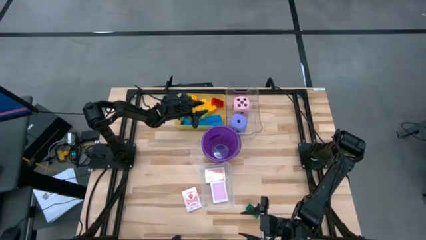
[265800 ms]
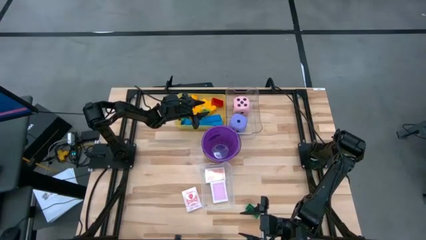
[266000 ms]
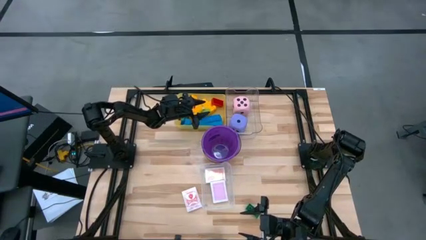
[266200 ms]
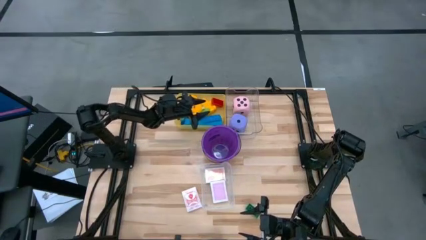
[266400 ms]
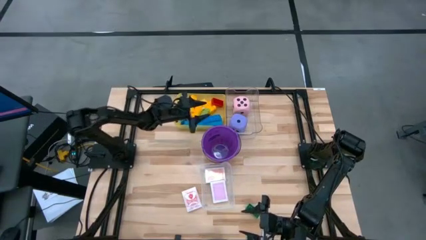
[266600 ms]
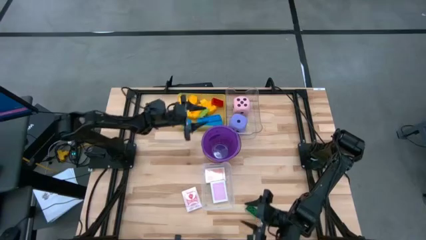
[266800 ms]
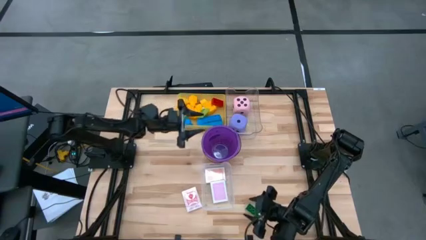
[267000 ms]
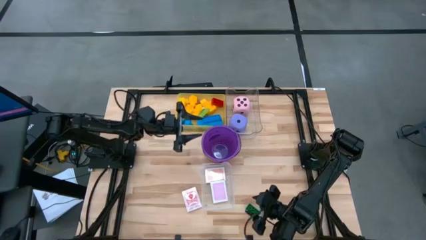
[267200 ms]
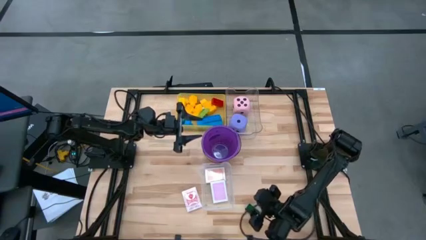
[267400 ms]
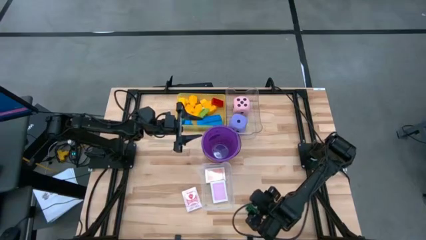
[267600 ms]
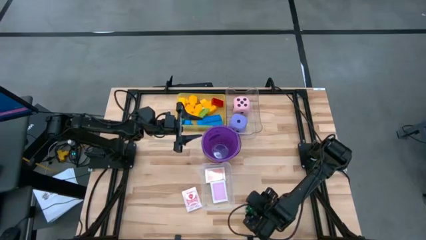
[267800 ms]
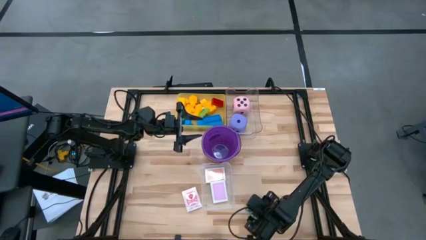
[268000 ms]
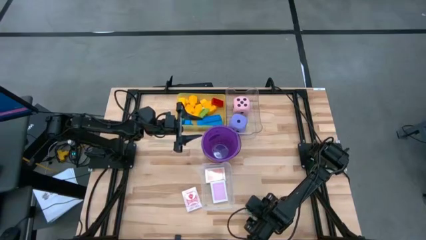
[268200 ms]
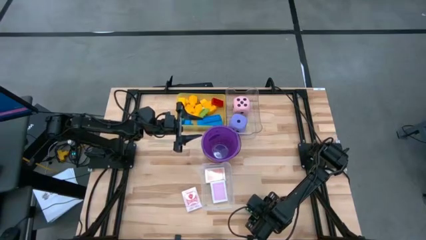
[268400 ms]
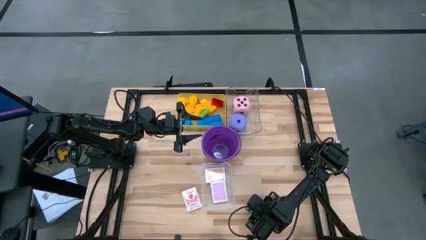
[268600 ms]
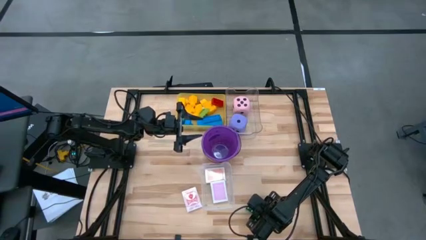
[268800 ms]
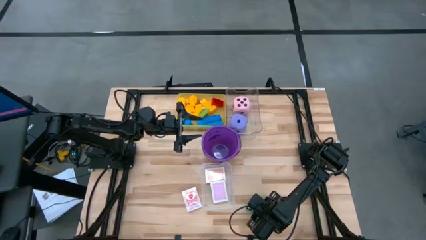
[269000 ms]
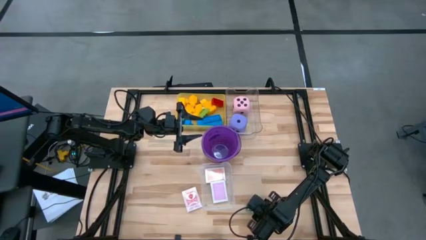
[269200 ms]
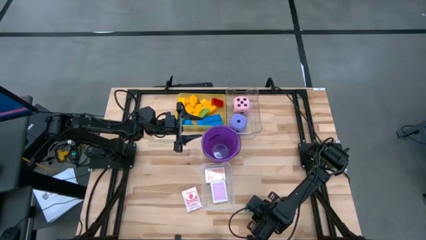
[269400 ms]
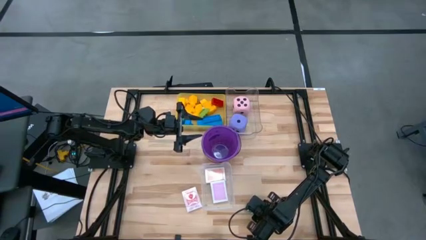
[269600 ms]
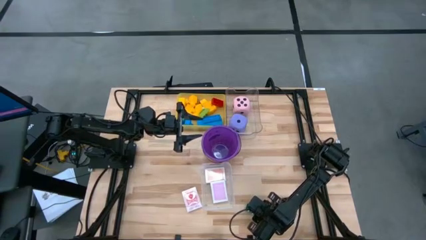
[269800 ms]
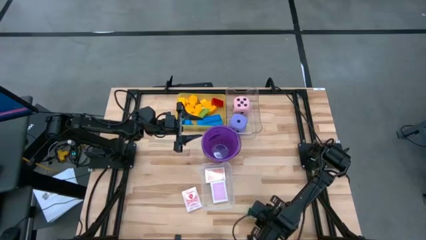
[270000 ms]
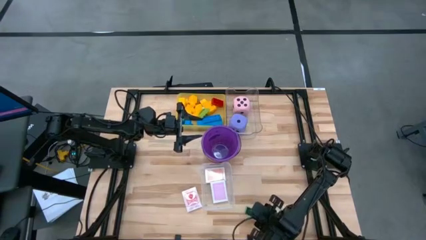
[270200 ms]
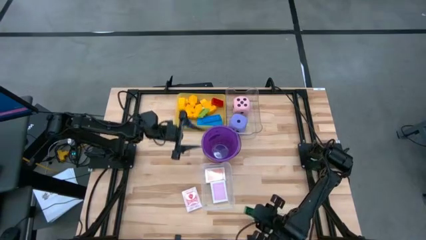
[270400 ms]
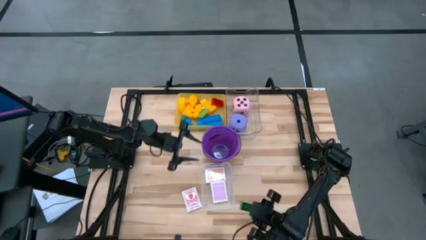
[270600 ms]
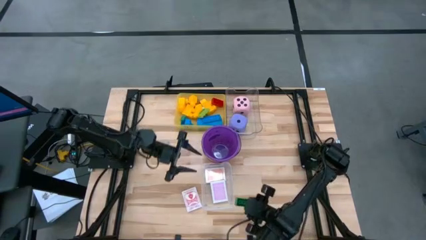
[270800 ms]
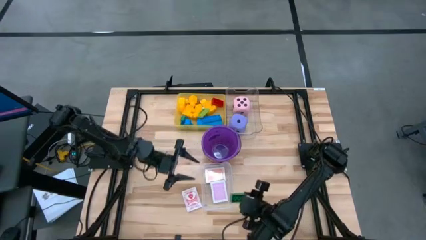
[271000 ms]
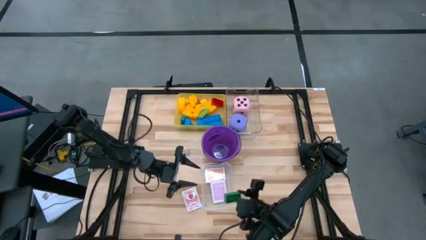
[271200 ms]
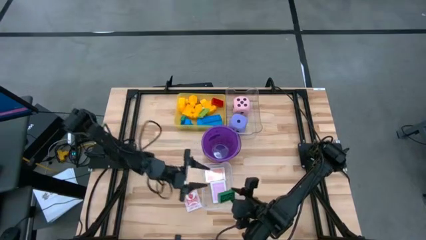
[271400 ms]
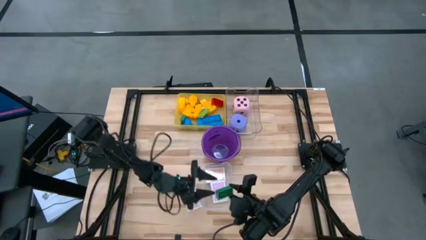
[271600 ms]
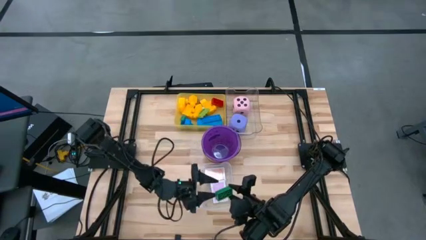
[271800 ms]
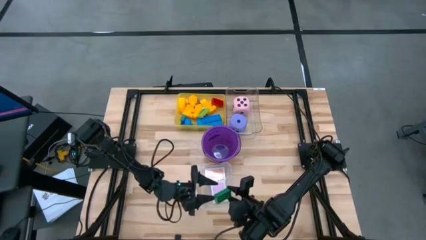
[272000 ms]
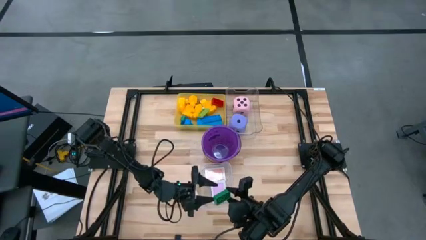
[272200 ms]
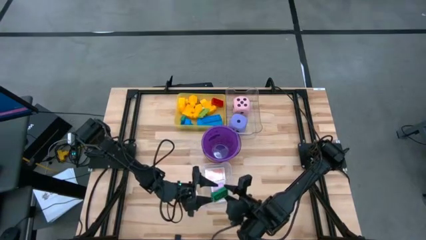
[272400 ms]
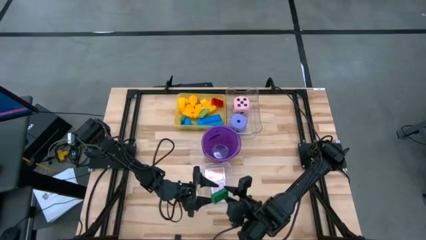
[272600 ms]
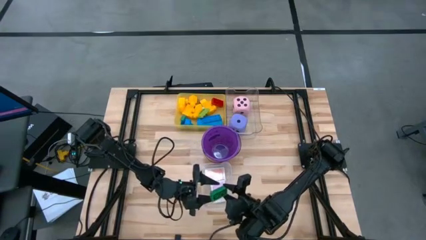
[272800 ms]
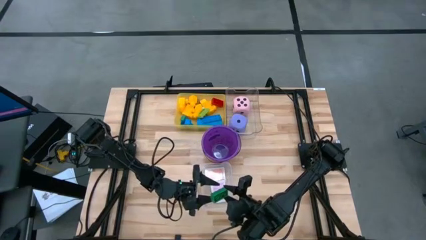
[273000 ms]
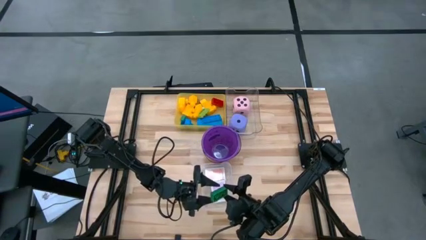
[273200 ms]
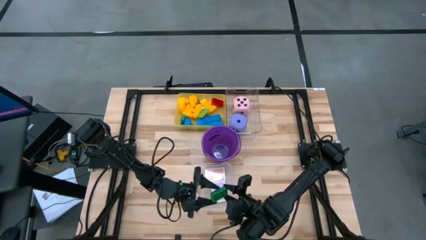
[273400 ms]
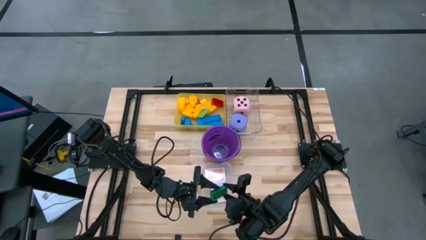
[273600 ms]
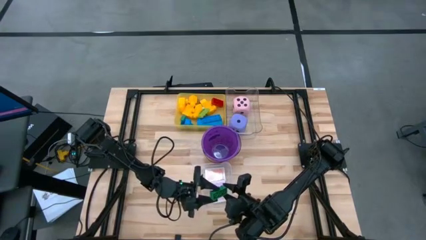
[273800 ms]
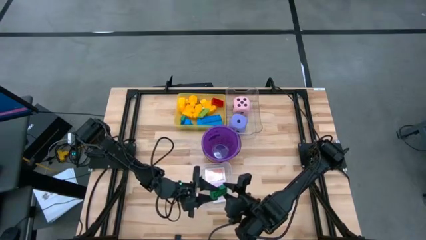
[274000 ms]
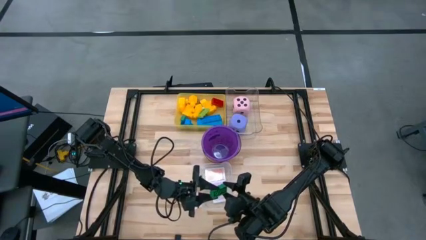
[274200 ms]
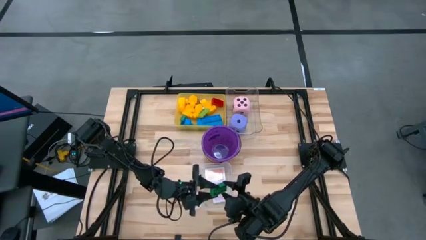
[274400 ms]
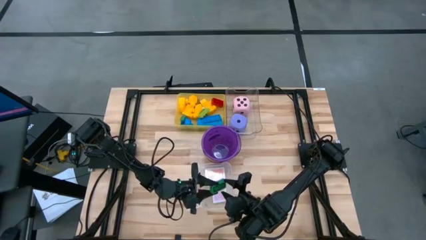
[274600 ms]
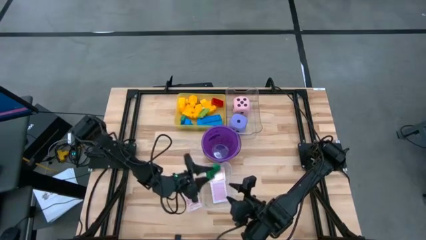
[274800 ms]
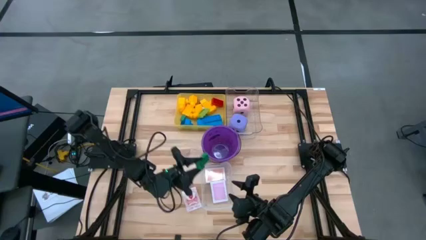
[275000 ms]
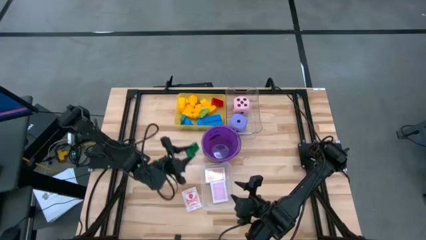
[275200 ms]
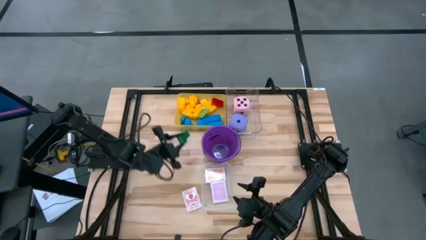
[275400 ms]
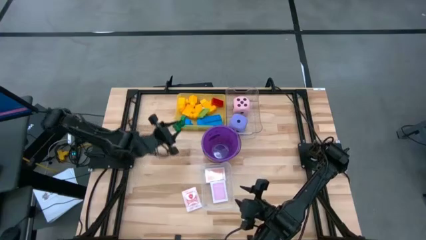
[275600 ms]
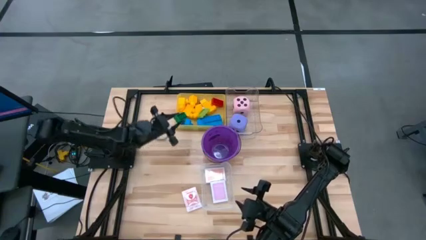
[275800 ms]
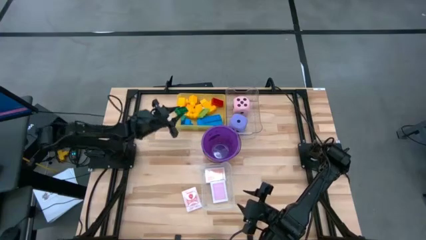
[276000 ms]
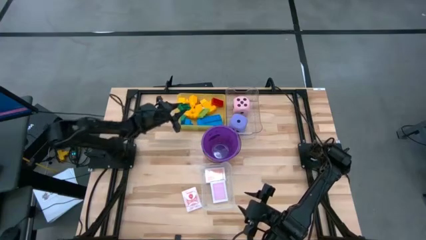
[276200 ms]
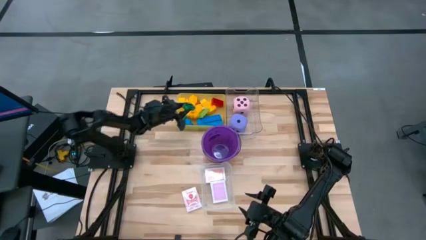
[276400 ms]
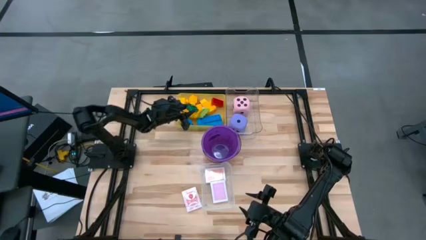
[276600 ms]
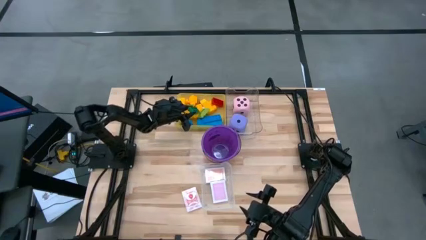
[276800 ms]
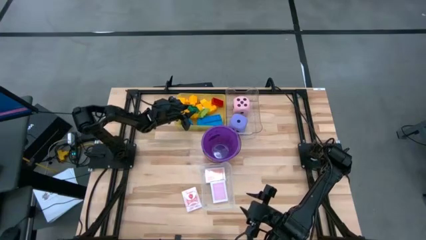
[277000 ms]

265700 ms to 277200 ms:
Task: Pick & Place Toys
Put the green game piece into the yellow bin

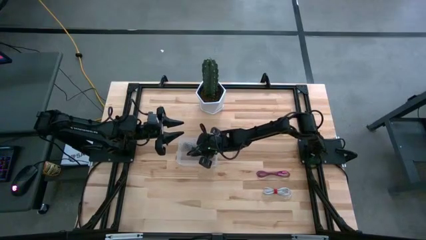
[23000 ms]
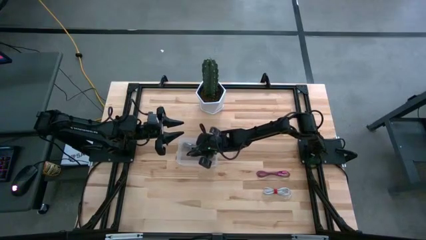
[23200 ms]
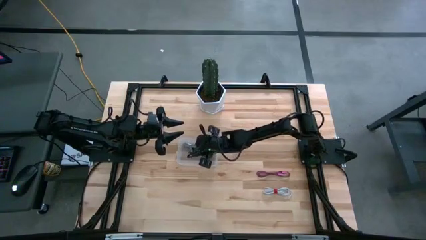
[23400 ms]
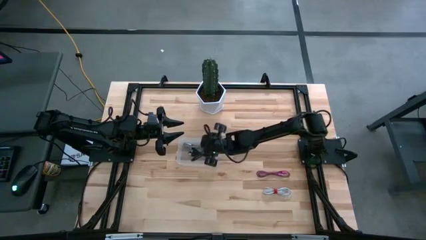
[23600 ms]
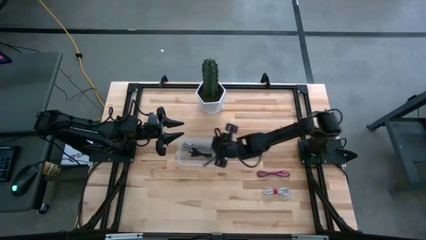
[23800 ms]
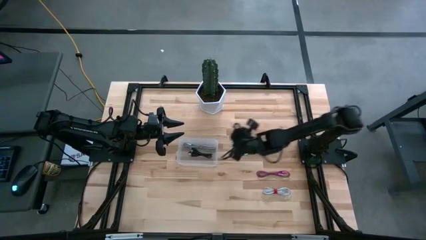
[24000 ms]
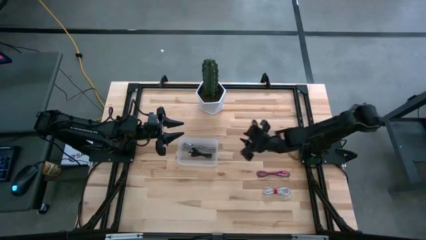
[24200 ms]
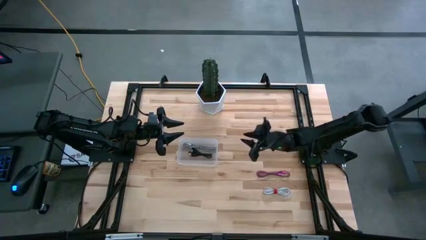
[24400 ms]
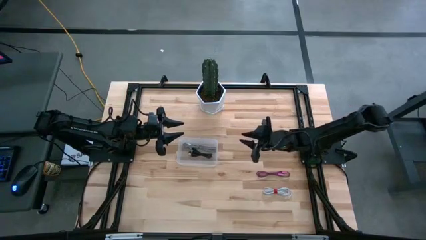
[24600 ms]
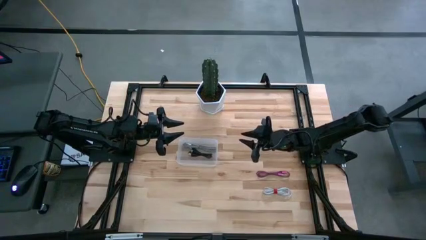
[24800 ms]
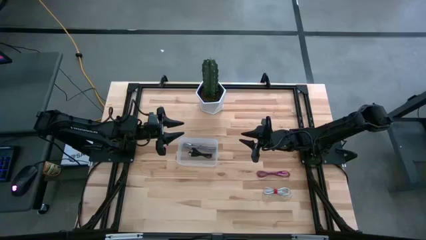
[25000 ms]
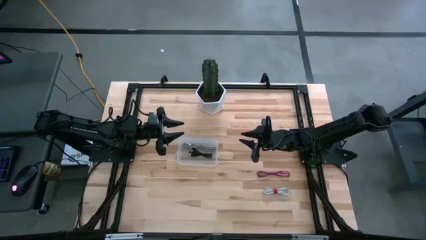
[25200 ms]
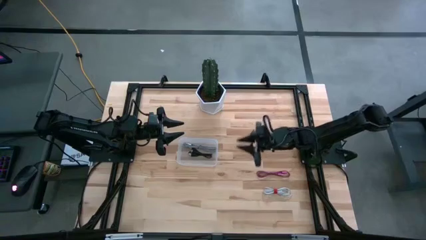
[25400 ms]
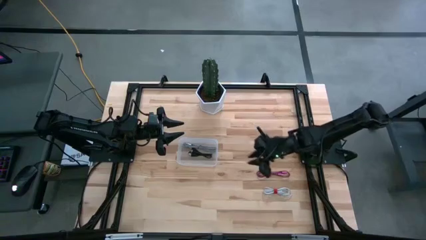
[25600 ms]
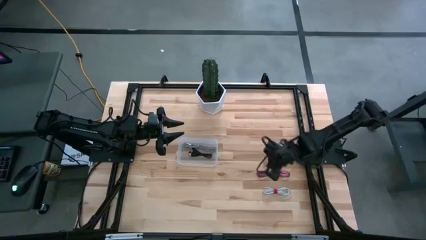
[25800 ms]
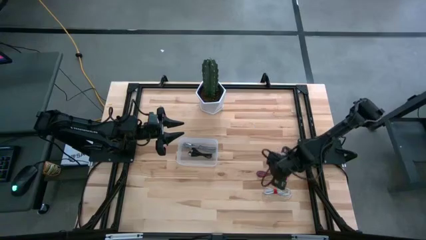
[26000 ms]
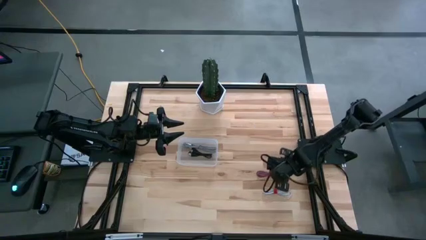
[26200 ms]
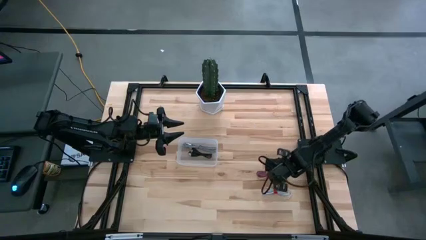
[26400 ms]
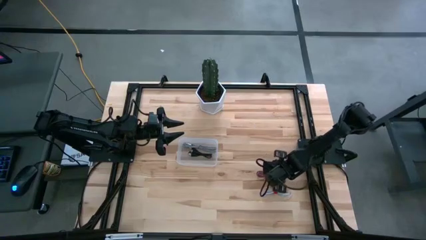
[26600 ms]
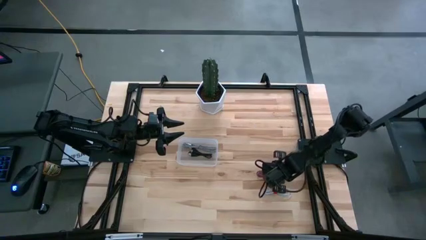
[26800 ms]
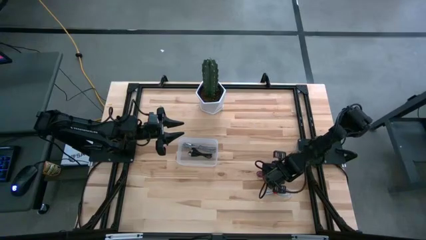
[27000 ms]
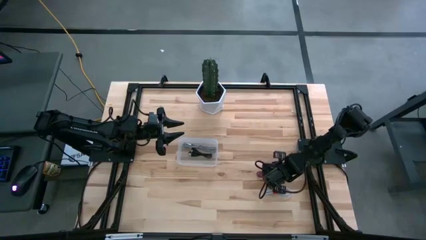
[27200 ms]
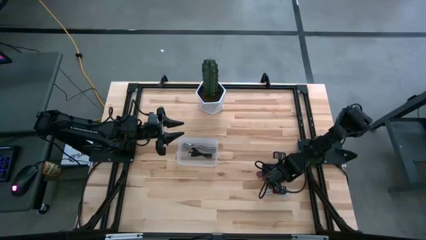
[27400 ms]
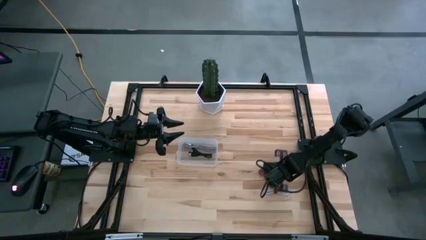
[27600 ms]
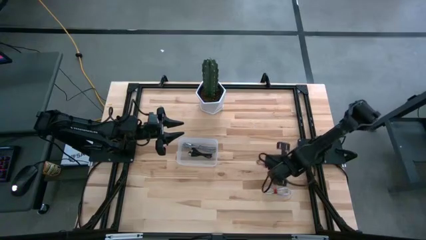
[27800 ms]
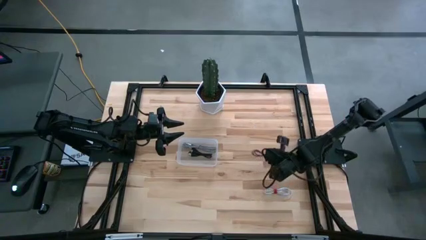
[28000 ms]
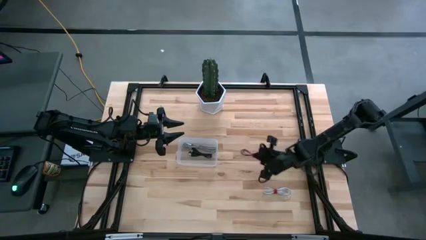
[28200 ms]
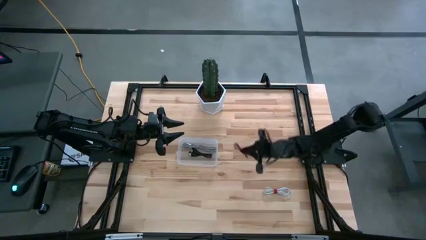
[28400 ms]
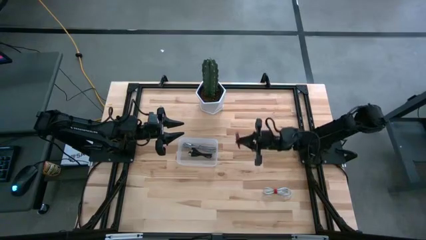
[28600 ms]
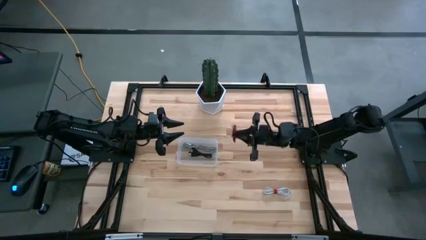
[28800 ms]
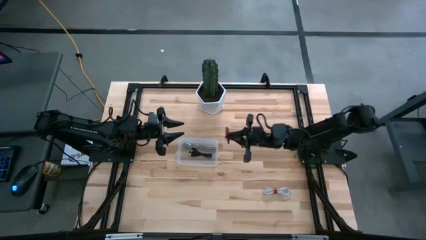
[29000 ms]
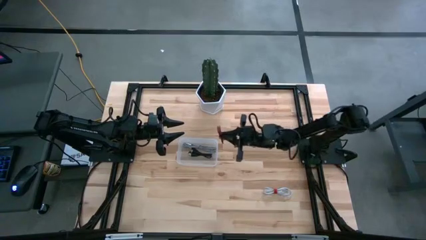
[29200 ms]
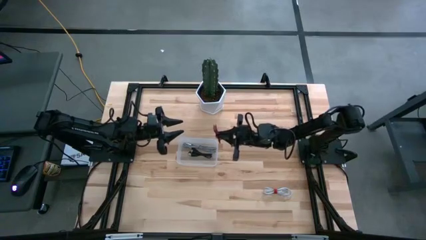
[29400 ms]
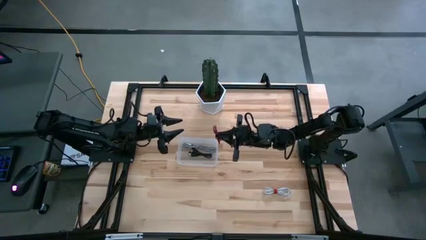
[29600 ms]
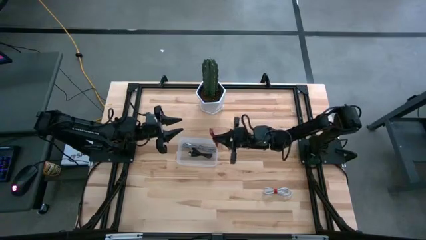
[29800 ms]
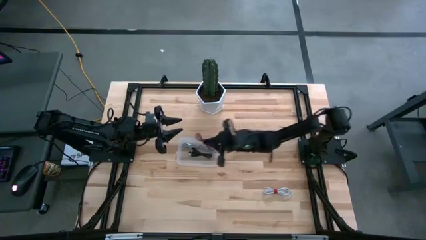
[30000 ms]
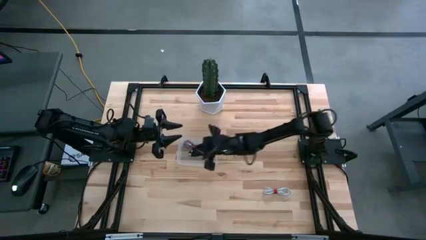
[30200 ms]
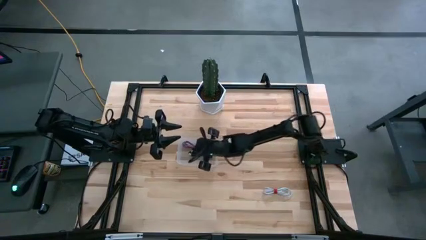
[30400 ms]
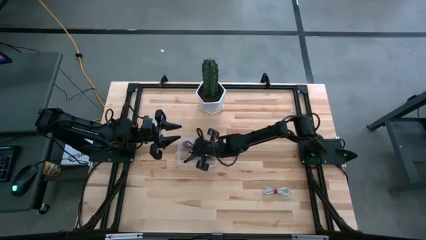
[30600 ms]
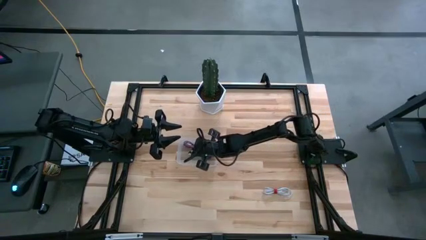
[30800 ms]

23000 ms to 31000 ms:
Task: Pick and place USB-C Cables
Put the pink charger cable into the transparent bin
